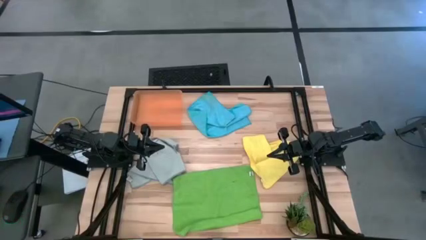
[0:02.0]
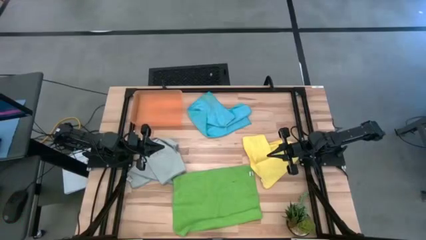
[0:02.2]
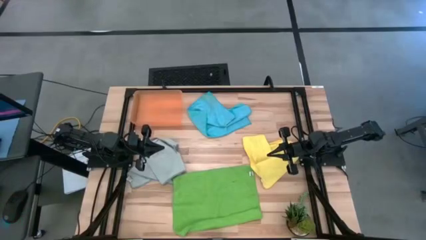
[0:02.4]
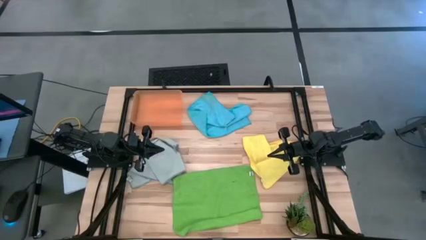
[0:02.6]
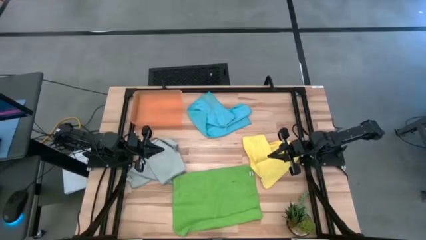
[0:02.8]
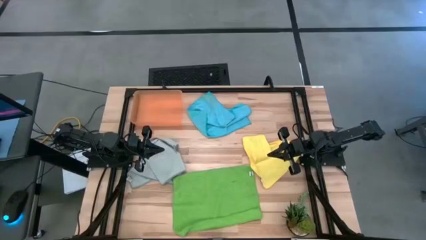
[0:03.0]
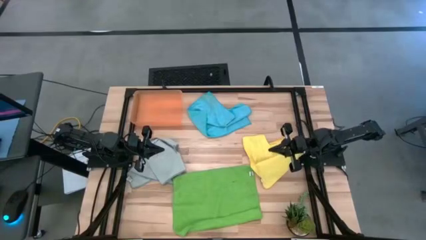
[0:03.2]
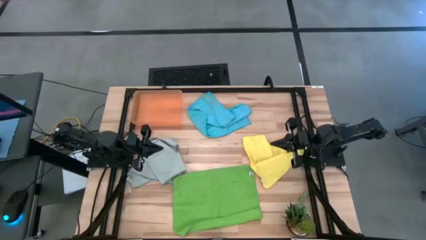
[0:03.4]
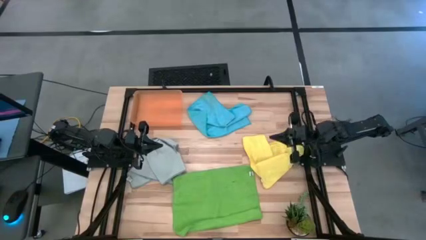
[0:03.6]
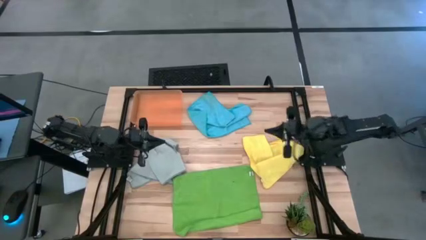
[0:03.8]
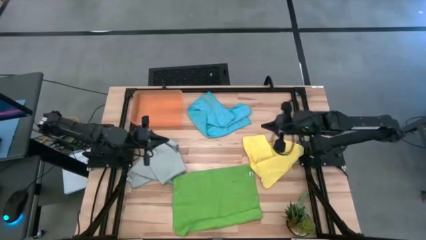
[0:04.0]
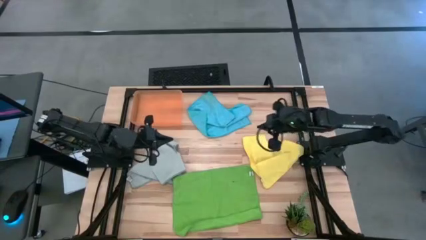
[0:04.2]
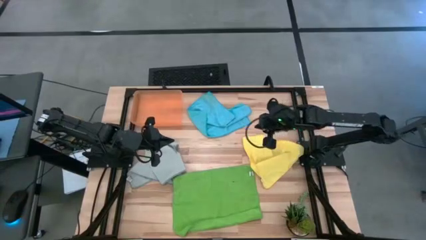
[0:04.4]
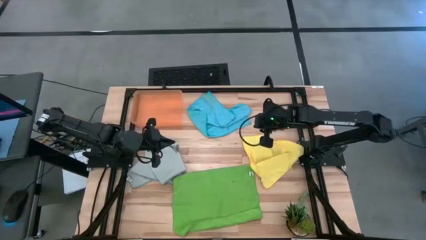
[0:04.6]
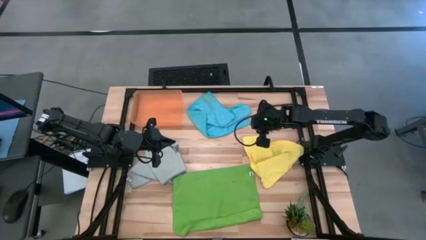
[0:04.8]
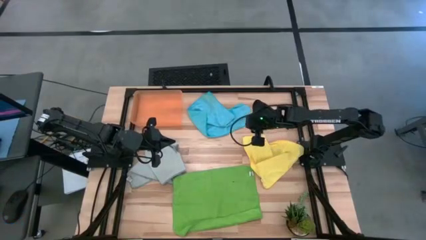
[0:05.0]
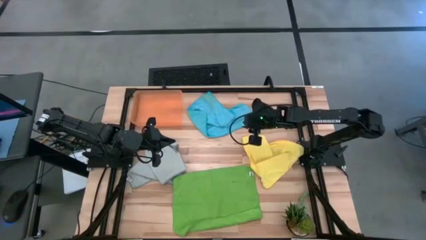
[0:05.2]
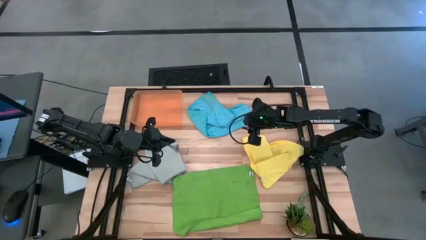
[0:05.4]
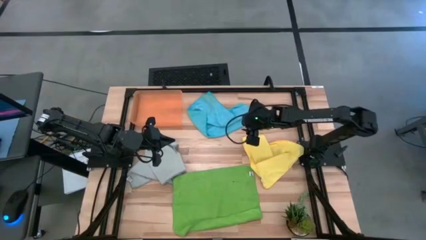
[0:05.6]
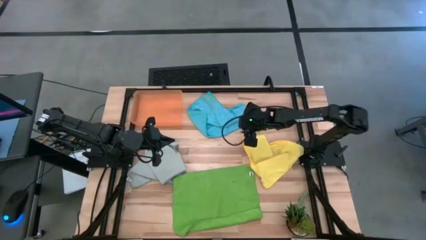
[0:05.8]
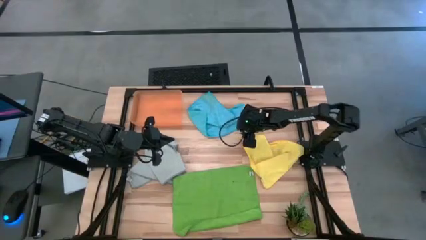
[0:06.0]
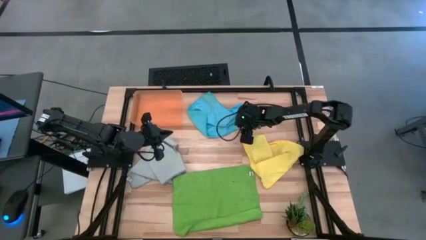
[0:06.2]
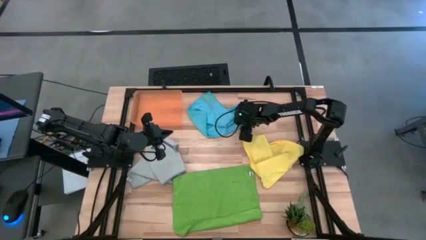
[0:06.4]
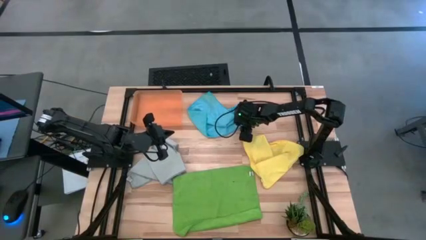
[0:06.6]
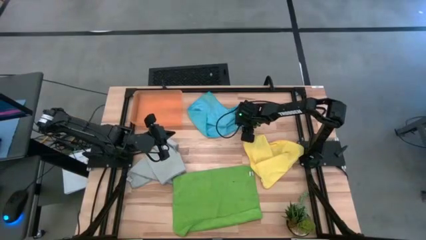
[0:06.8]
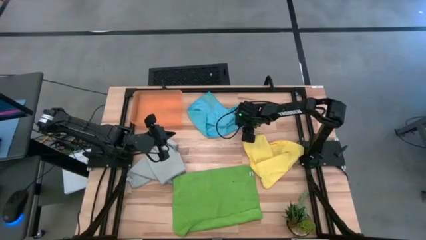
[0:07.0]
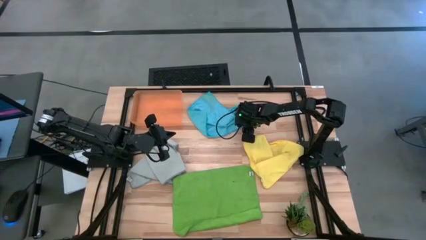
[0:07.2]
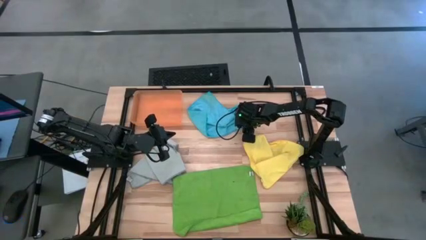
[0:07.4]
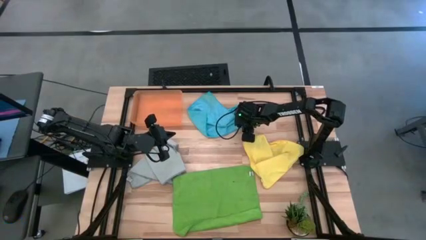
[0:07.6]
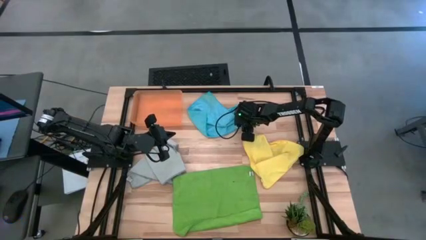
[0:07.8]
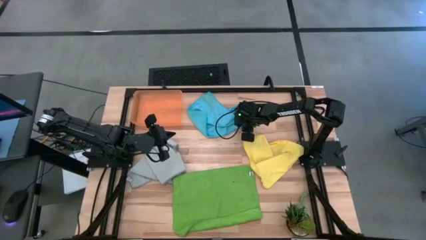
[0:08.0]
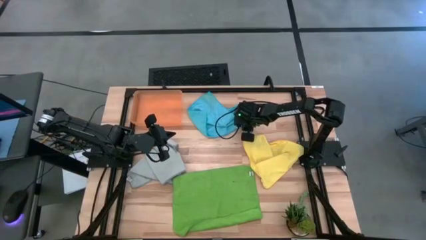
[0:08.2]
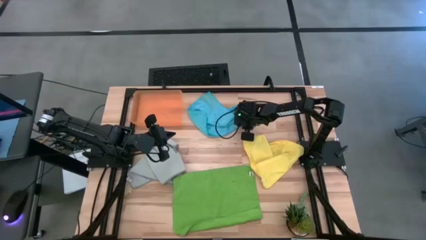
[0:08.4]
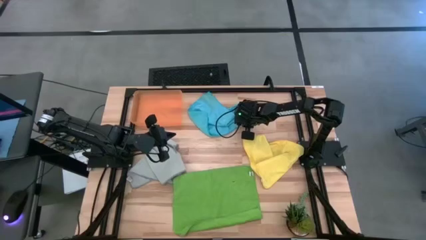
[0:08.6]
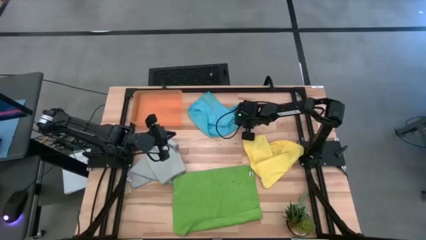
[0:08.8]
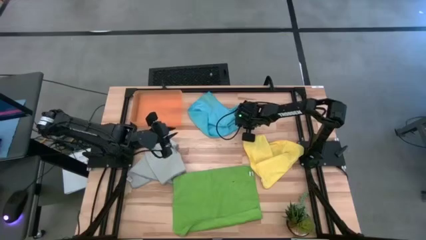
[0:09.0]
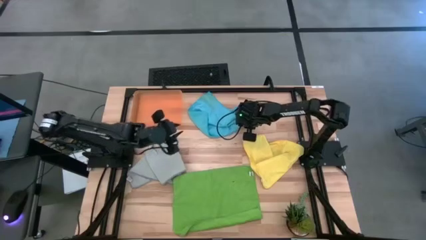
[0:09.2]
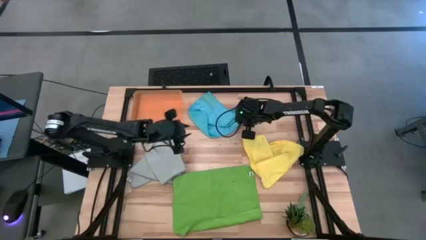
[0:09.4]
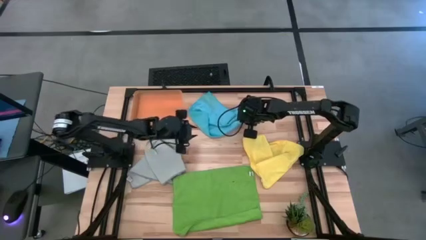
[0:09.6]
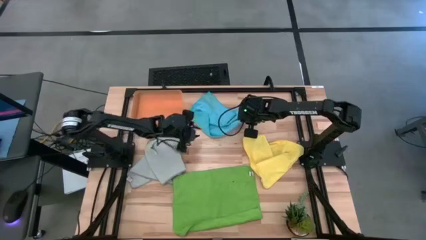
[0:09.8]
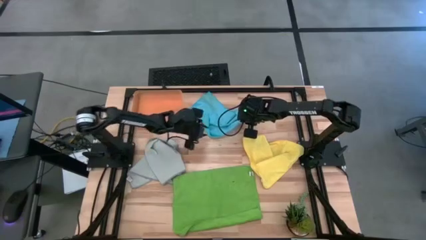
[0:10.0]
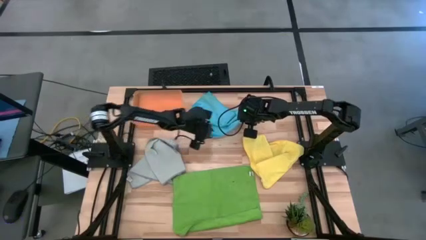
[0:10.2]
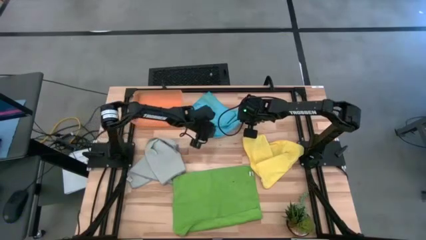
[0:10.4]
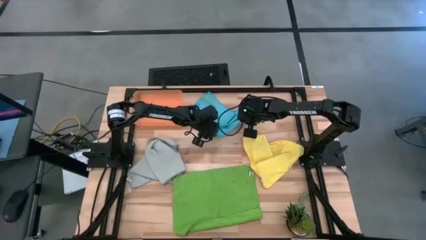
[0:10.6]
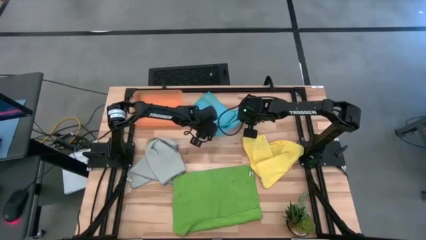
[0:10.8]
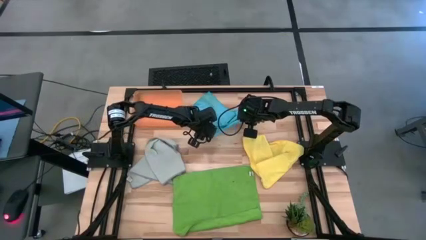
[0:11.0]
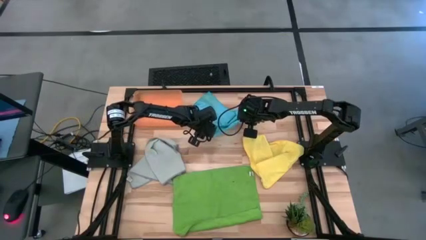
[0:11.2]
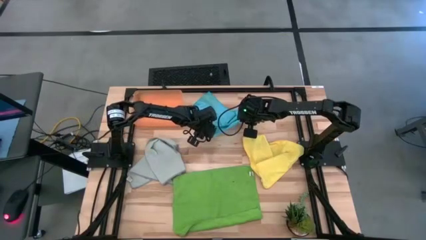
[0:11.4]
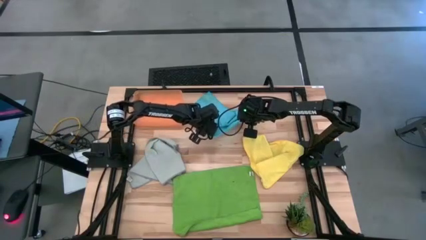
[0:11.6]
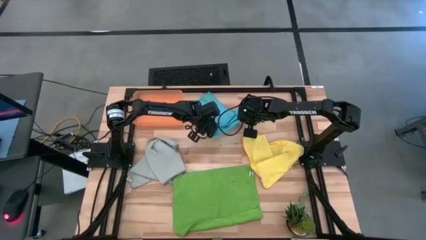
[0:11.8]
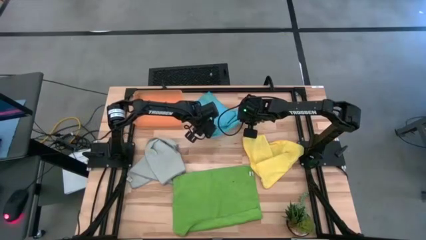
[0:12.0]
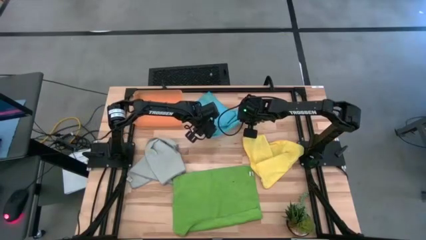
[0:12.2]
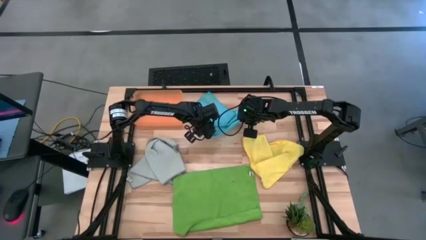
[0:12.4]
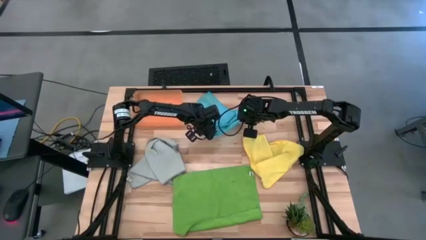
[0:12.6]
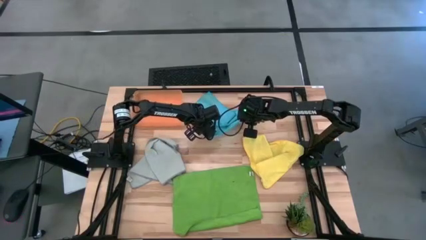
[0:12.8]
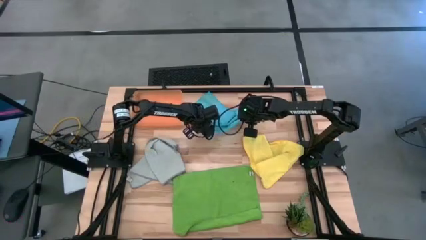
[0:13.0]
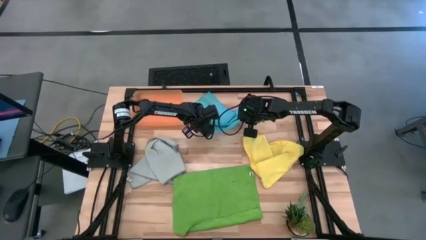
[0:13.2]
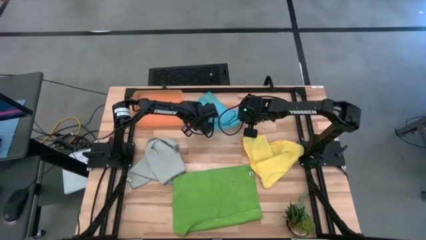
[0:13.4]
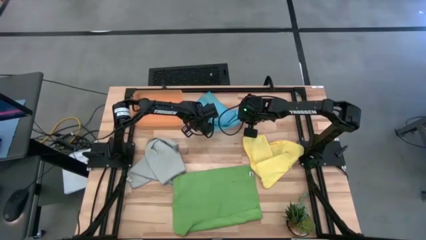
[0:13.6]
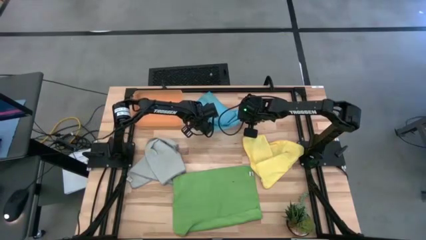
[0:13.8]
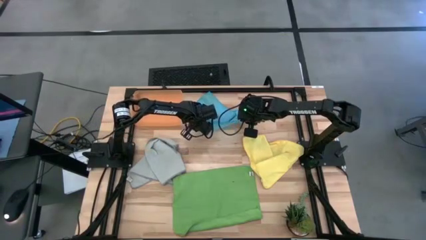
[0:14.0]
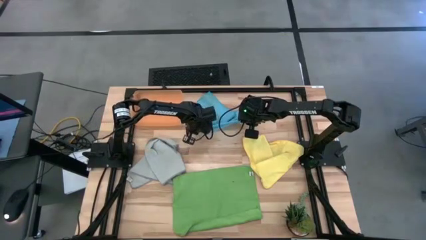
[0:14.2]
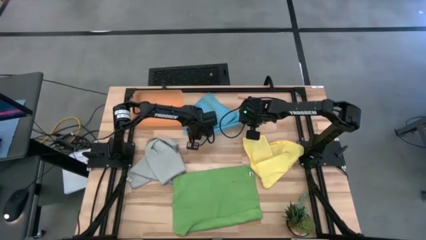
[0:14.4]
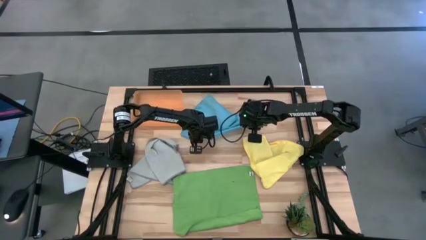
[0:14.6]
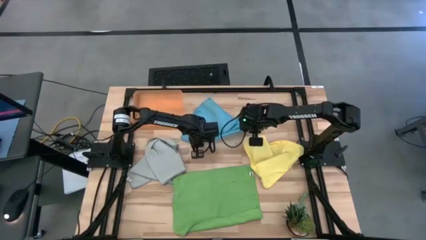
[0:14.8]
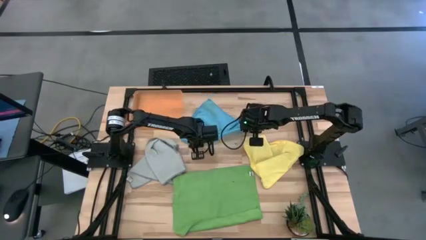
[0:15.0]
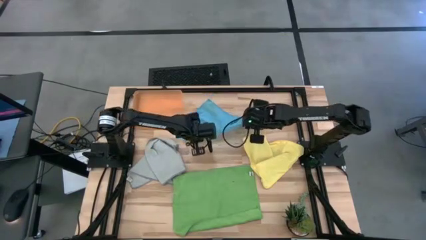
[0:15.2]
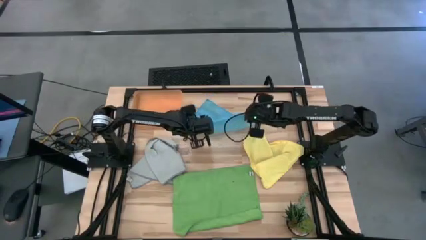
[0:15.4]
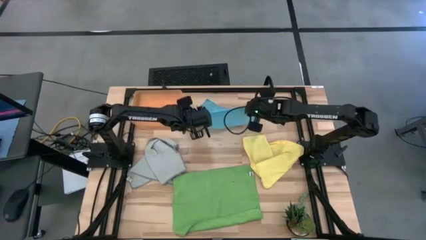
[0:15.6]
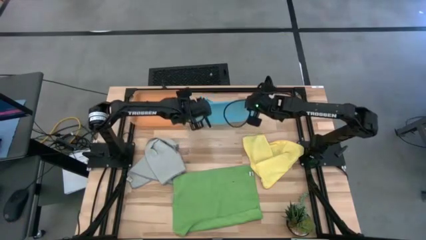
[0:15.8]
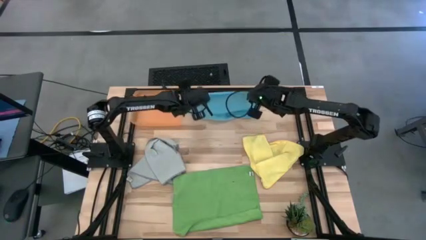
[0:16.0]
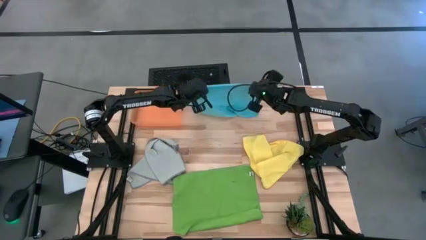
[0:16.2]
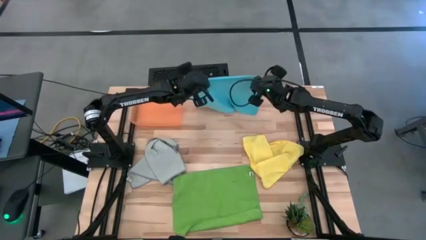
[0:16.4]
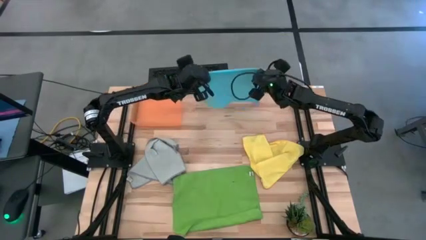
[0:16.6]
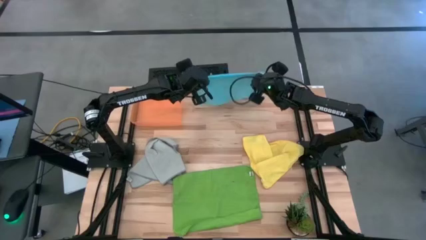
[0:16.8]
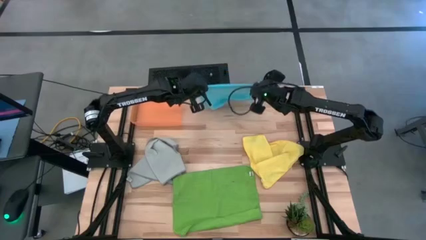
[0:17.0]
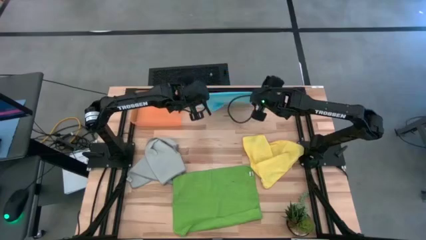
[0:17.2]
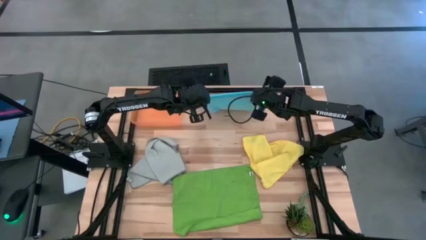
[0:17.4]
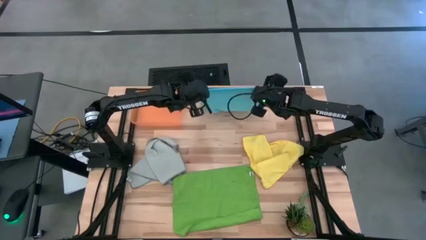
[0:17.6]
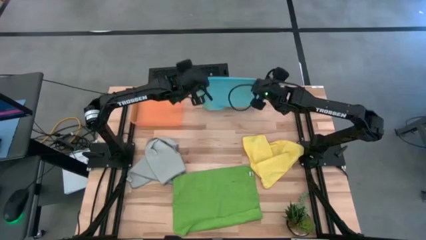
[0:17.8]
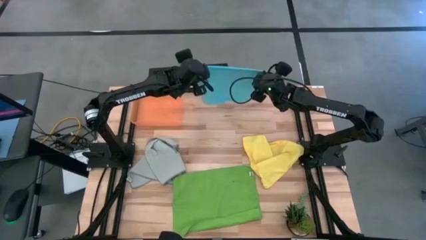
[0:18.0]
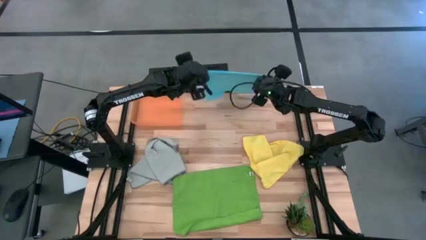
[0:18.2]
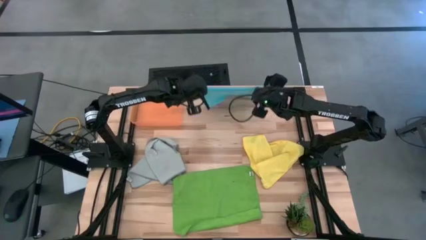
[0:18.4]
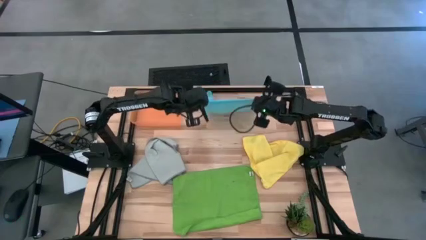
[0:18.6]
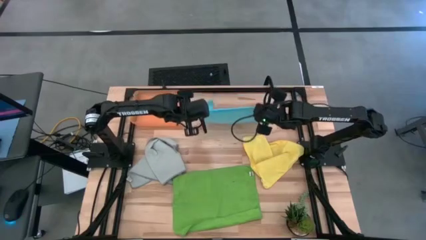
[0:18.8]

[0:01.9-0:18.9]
Task: Fold microfiber towels
Fold the blue microfiber cloth
